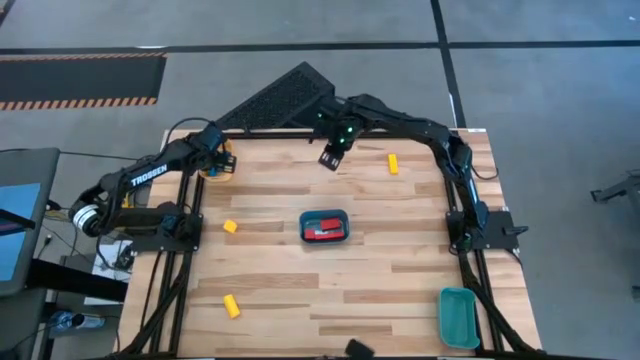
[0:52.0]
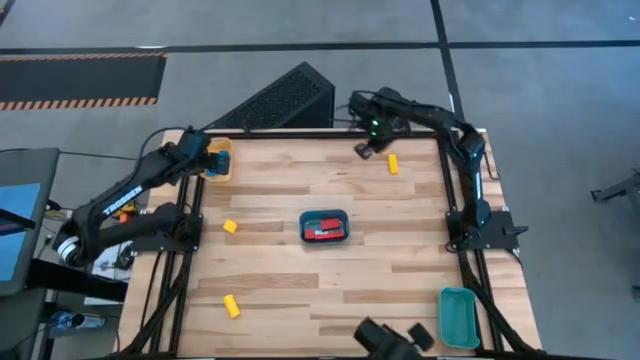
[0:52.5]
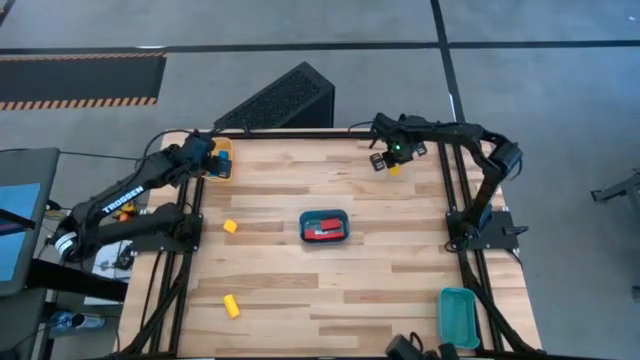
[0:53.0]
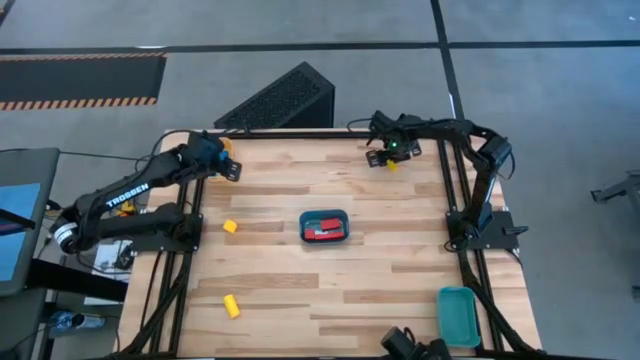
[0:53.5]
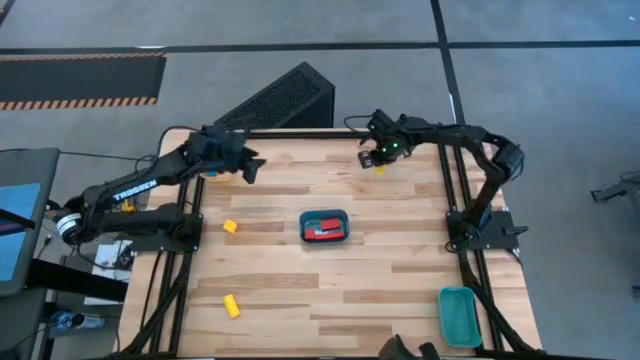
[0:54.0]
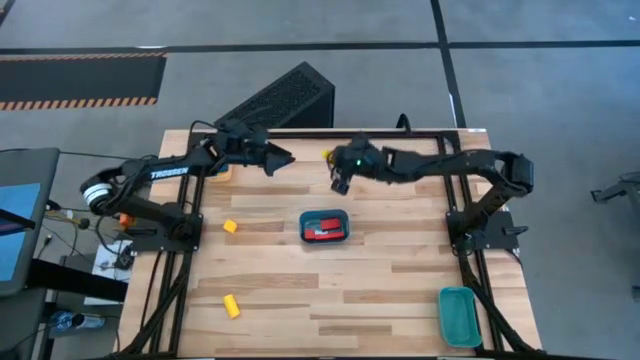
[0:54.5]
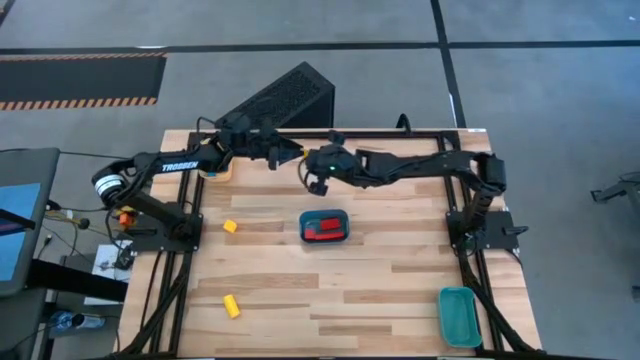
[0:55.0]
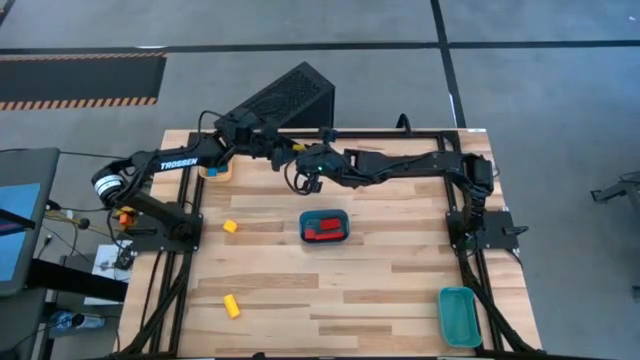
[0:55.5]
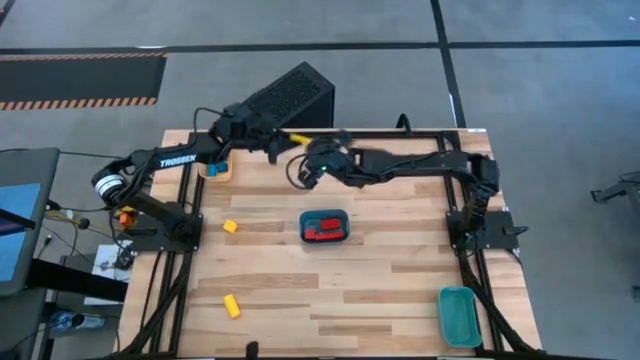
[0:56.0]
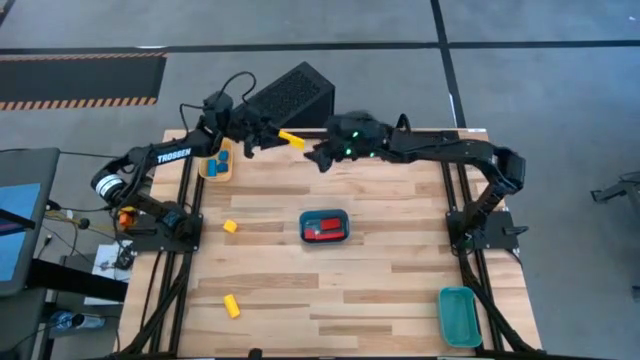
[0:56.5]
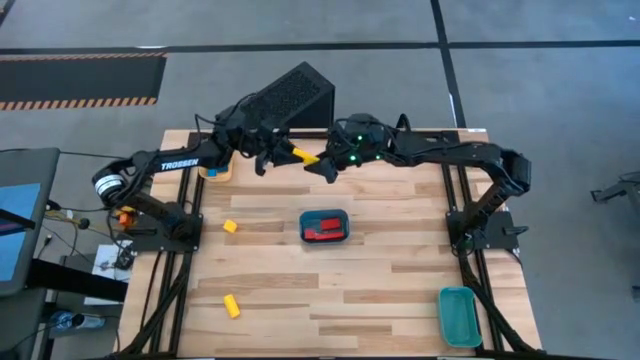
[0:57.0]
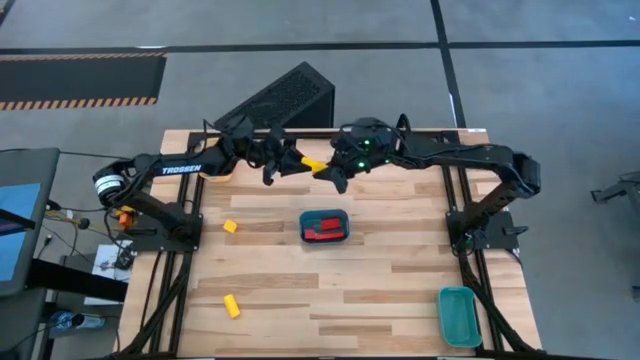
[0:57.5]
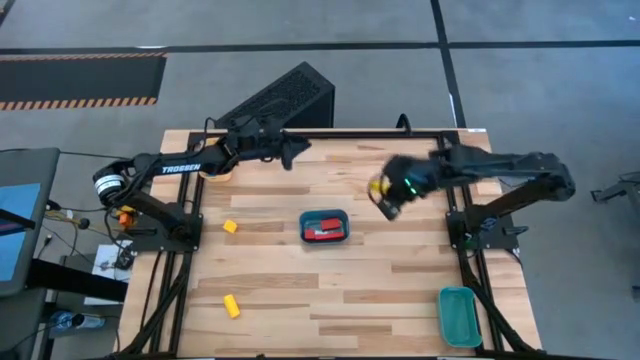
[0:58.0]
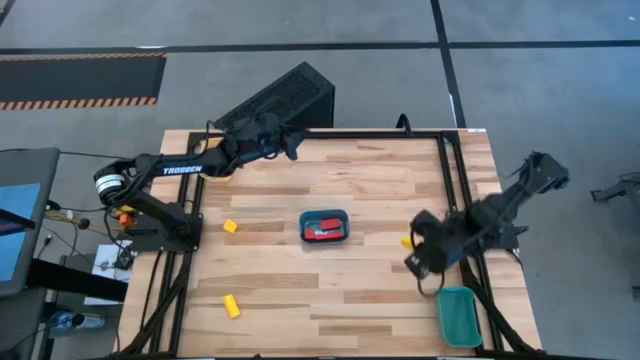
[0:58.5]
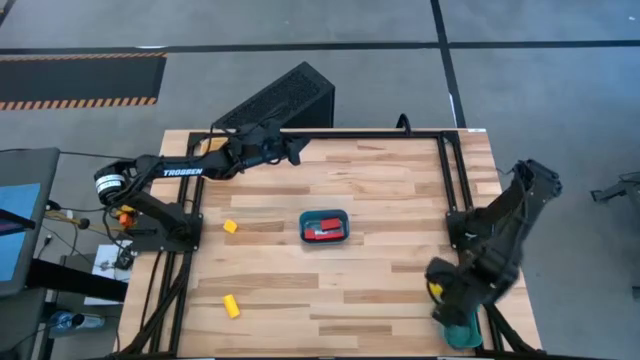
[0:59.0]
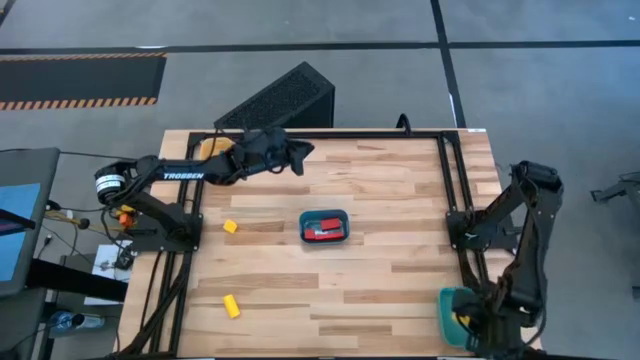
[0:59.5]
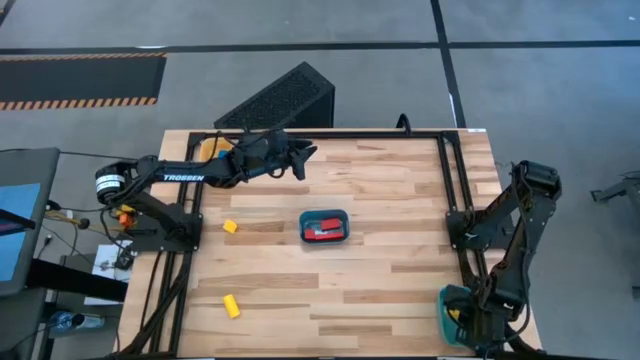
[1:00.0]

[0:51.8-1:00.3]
Task: Sort & place blocks by color
Put the top right yellow block into the green bin

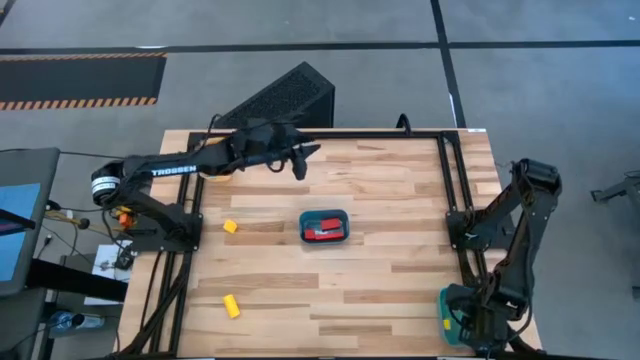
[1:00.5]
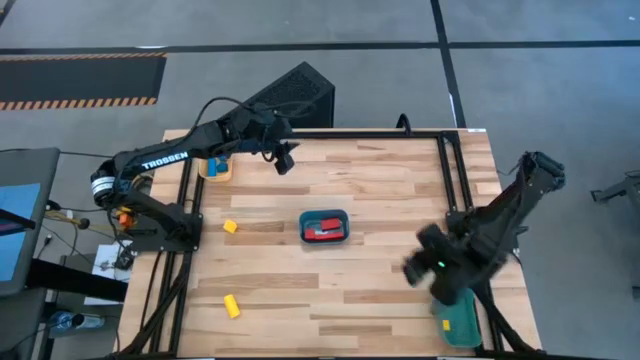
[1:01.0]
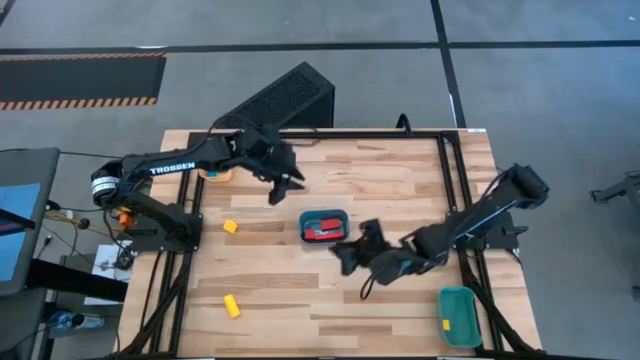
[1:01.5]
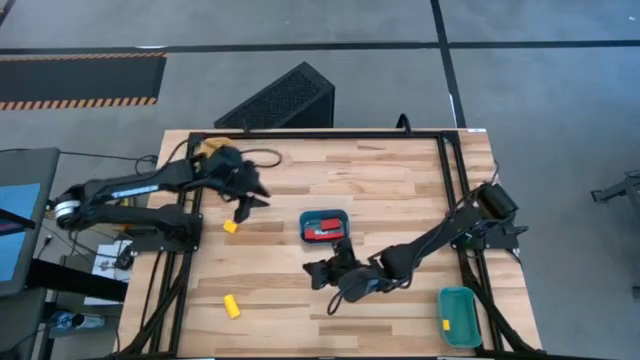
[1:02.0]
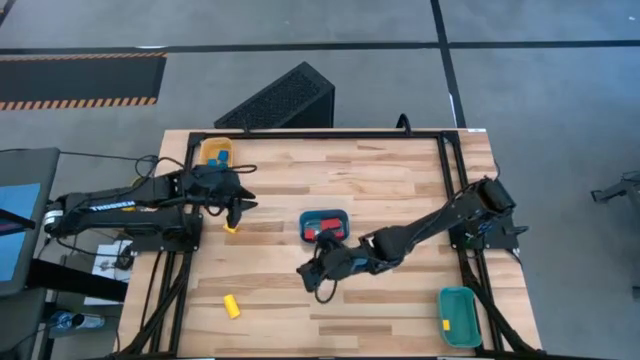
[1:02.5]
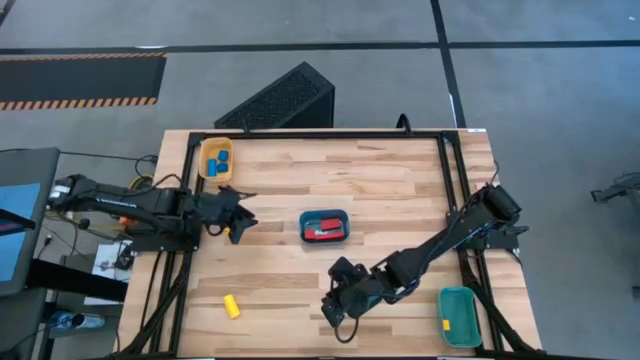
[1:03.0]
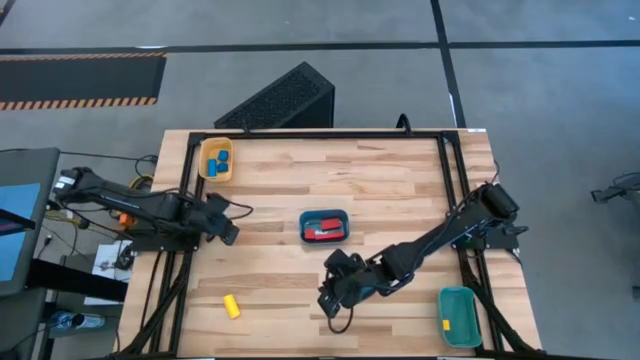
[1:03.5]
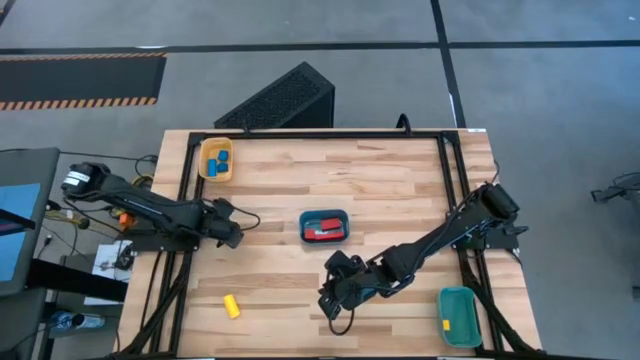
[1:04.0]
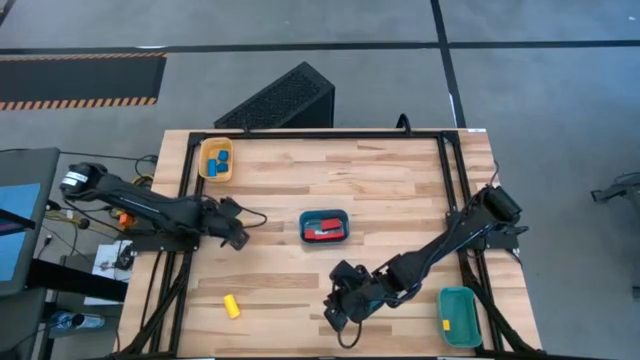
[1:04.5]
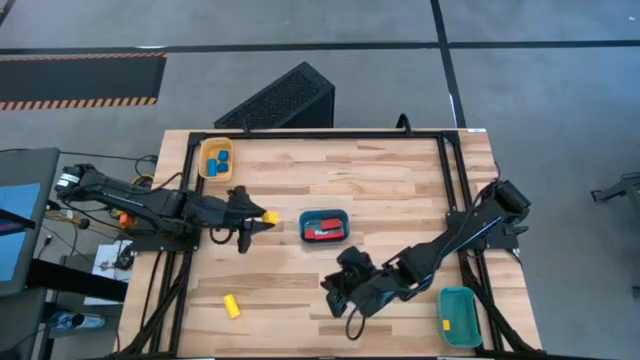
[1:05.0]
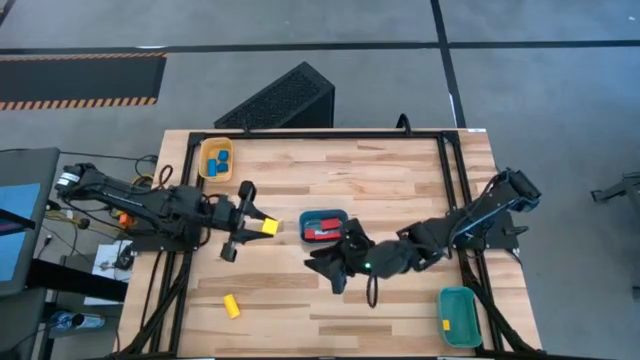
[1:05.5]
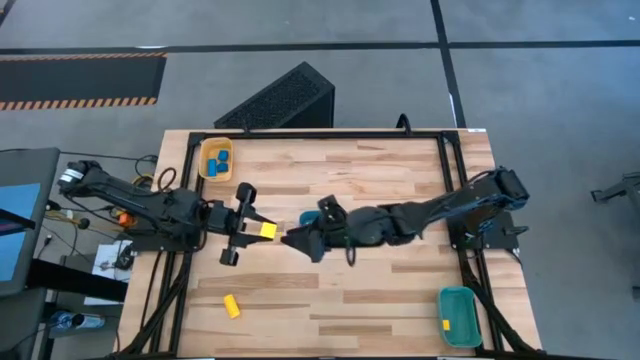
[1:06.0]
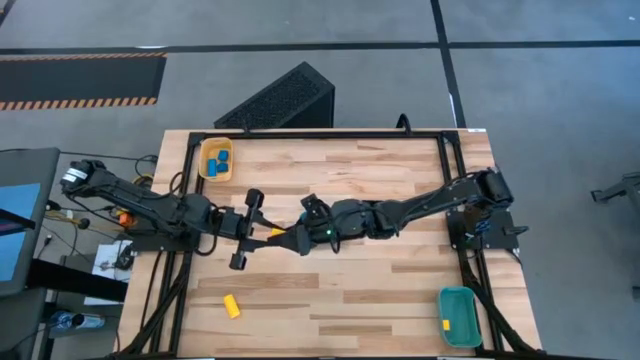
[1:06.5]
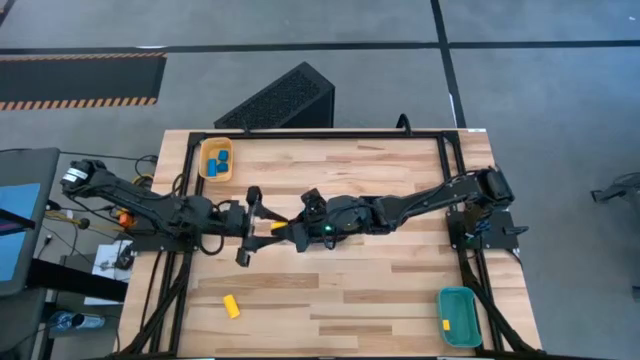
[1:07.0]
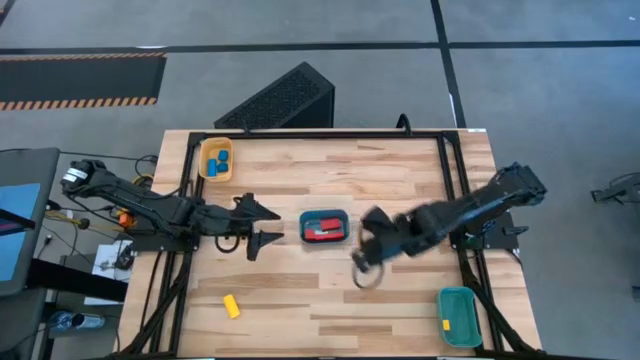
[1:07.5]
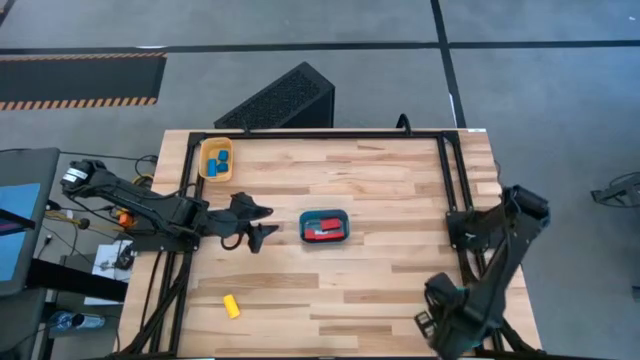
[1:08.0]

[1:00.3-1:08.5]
Put the top yellow block into the green bin

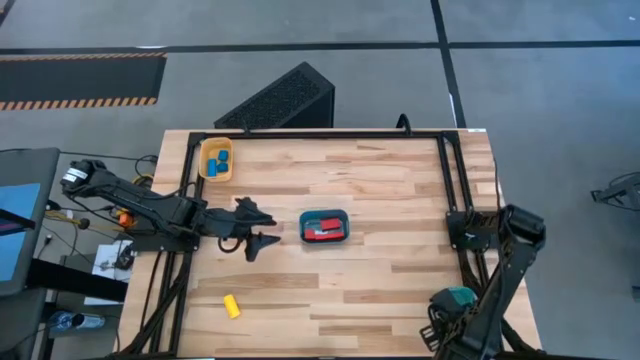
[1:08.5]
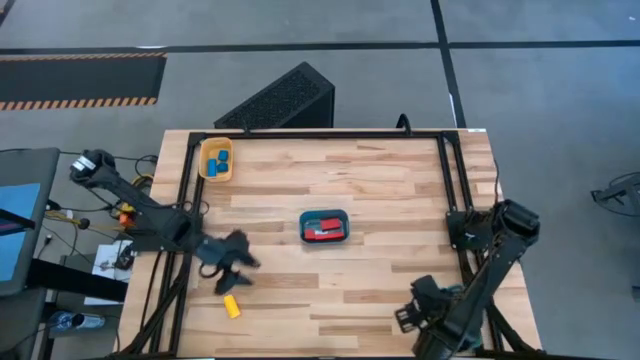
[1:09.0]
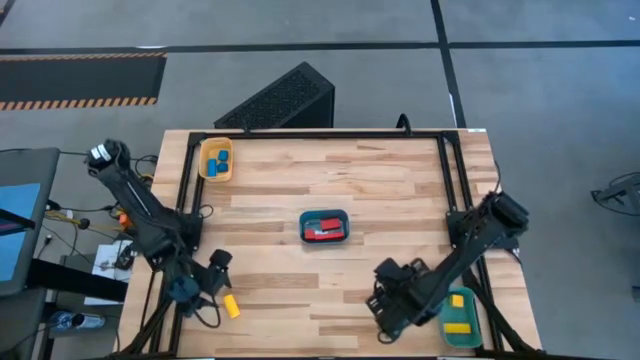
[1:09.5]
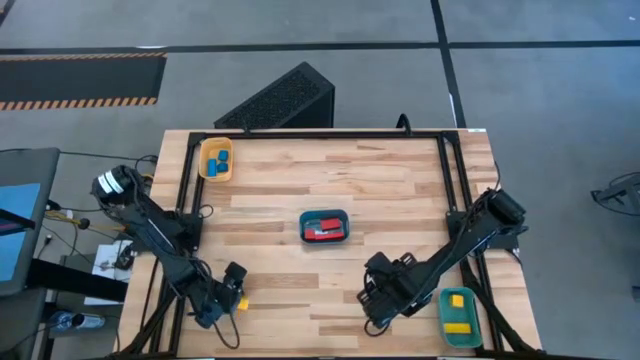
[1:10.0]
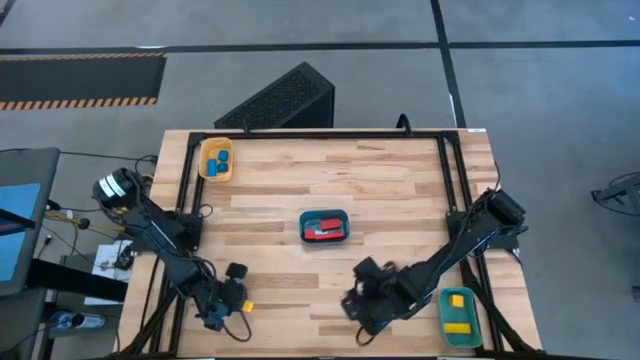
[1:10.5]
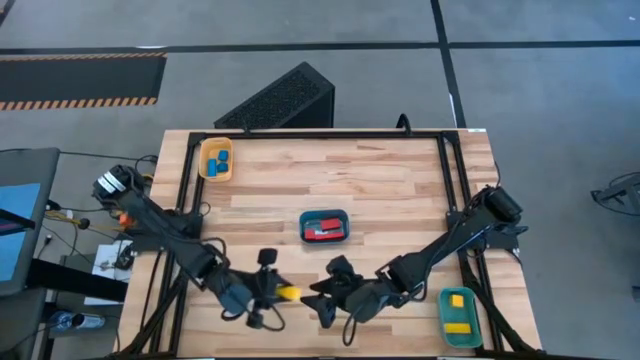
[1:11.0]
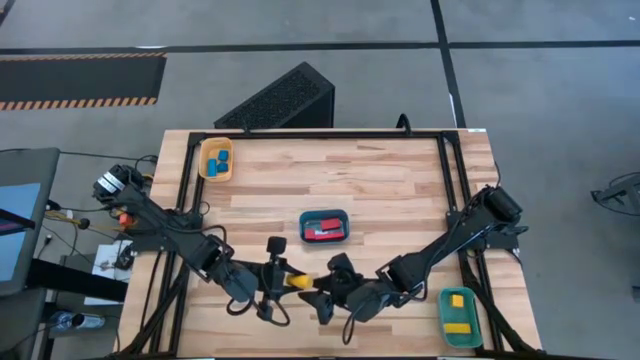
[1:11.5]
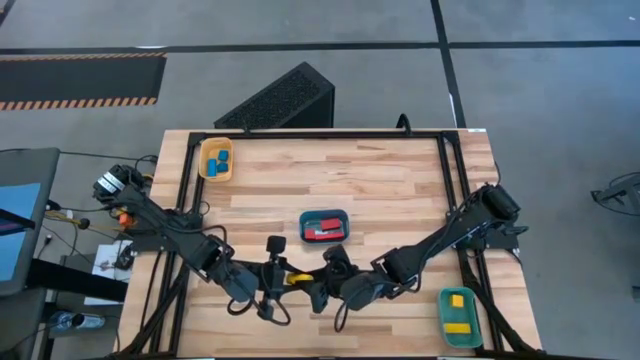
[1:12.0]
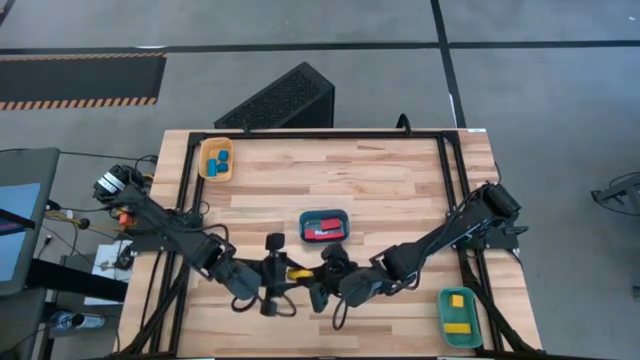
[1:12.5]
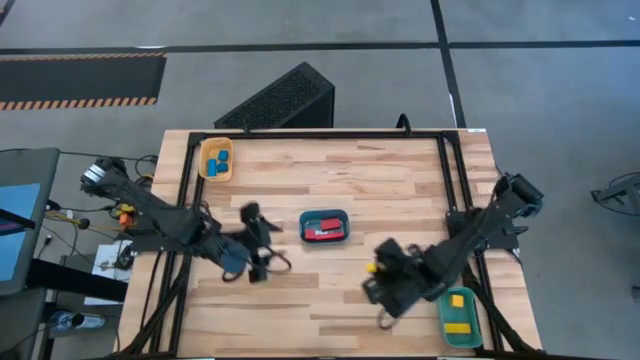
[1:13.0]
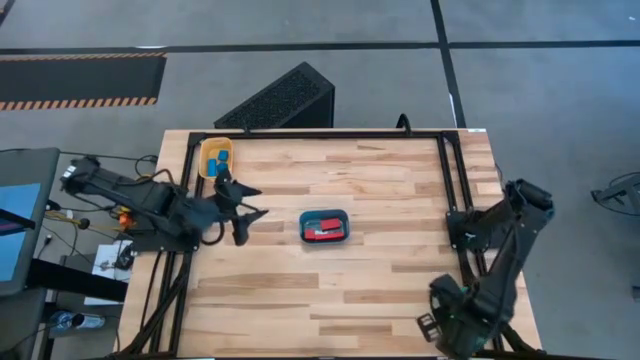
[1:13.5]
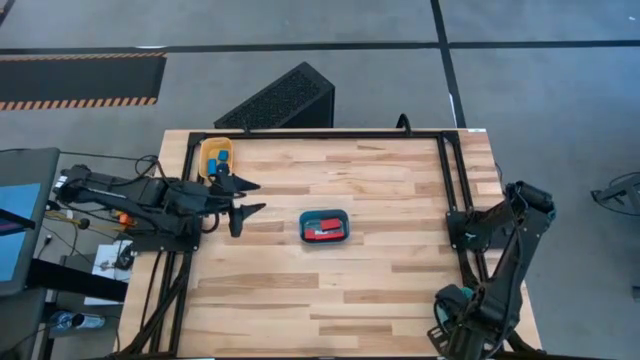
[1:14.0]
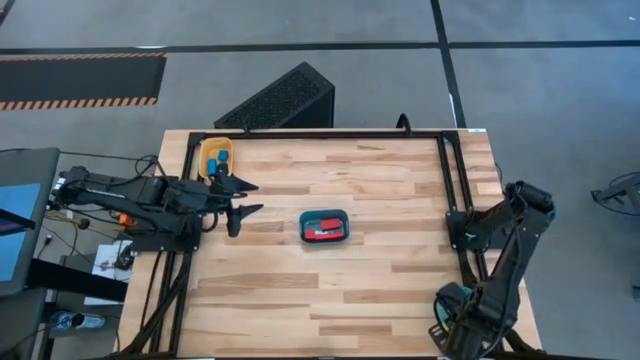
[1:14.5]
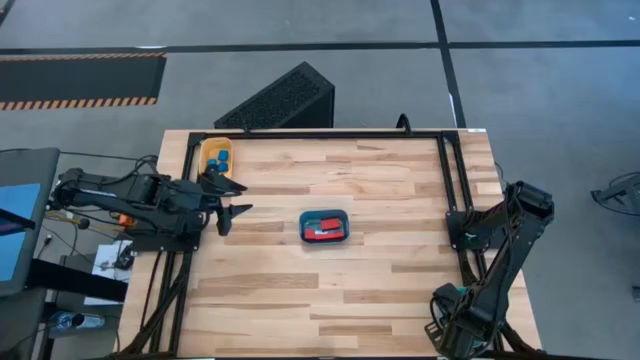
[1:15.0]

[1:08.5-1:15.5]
Put the yellow block into the green bin
